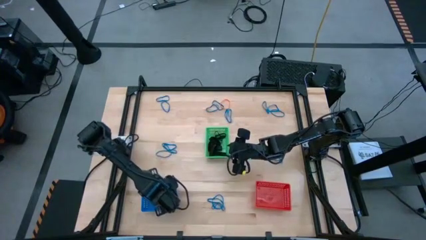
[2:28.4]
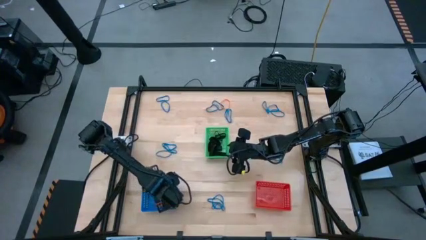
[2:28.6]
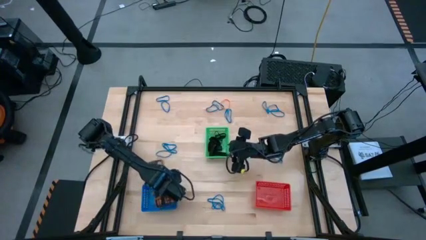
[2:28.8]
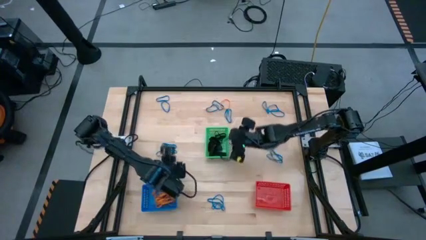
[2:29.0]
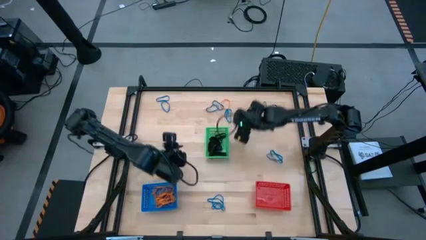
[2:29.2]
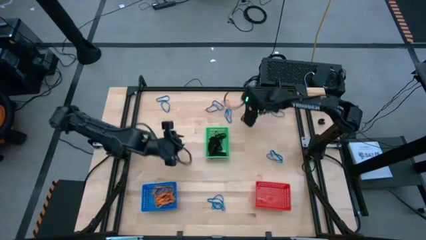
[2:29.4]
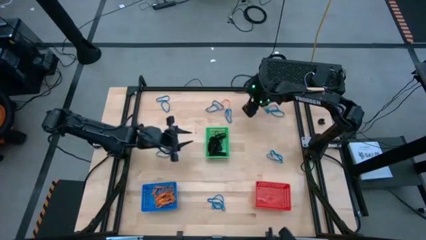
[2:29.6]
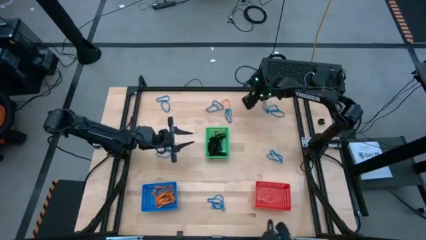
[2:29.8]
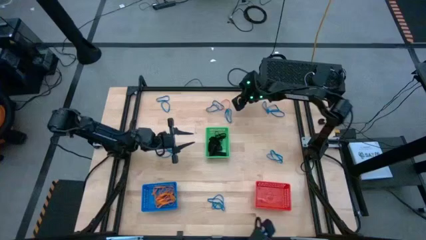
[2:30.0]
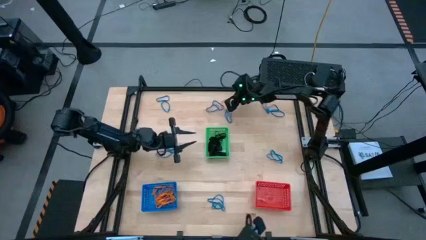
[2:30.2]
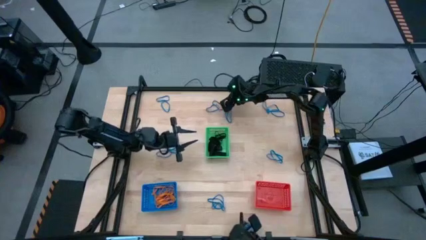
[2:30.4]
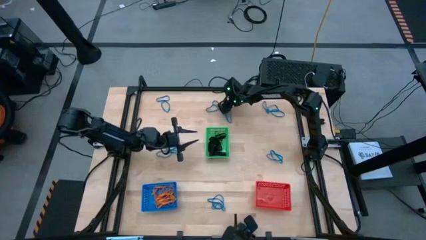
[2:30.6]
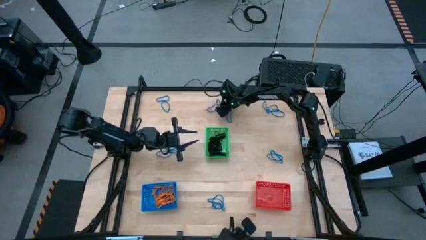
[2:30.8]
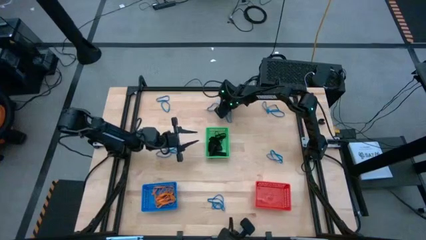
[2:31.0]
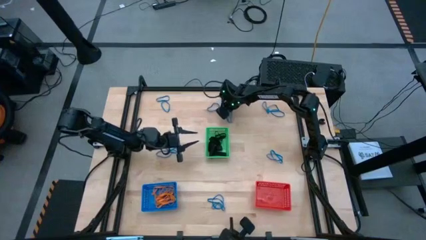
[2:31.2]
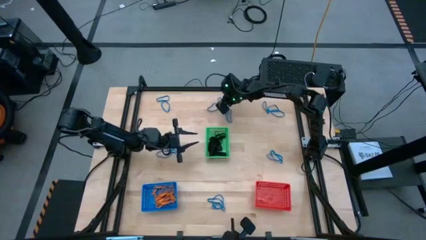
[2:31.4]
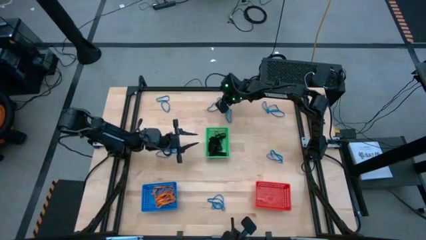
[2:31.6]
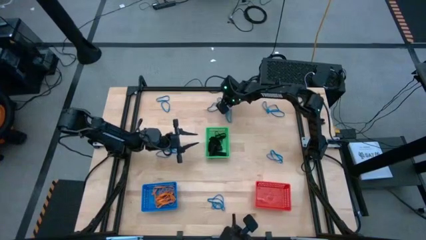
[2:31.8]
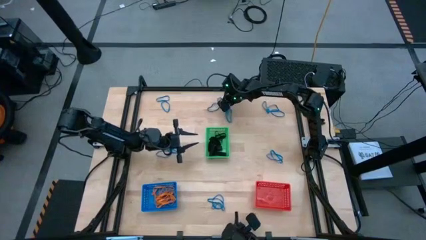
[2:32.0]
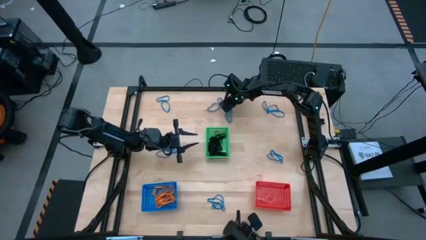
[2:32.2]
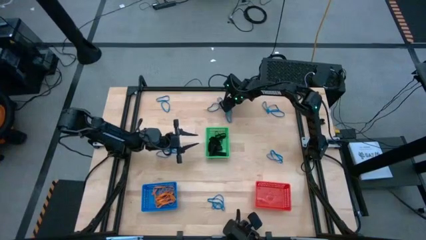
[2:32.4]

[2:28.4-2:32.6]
Task: Sort rubber bands into baskets
Put the orange rubber band into the blue bin

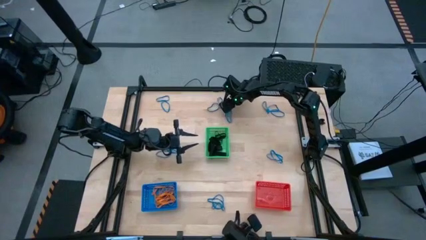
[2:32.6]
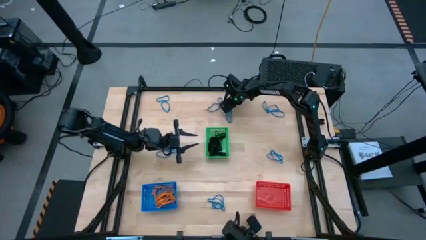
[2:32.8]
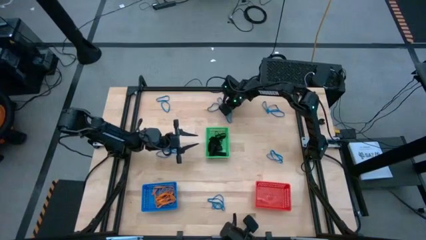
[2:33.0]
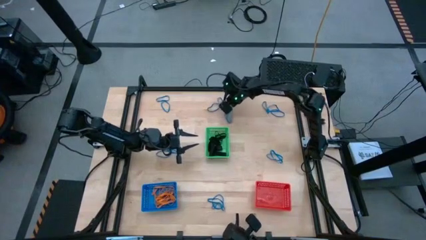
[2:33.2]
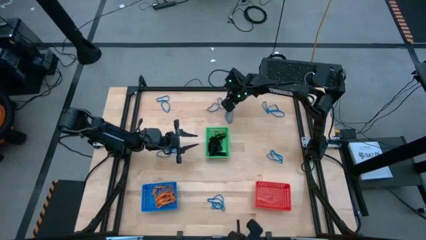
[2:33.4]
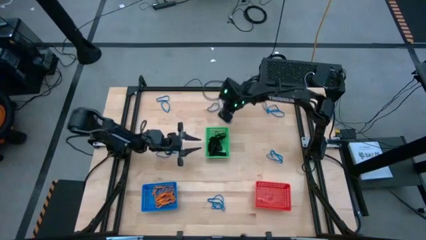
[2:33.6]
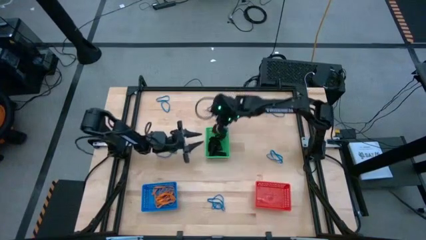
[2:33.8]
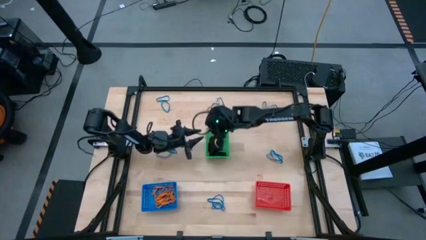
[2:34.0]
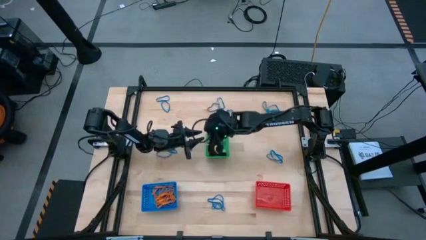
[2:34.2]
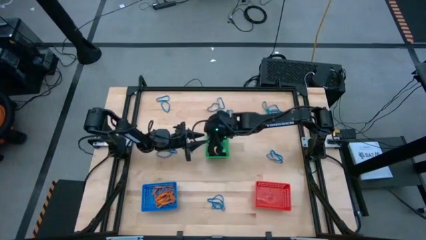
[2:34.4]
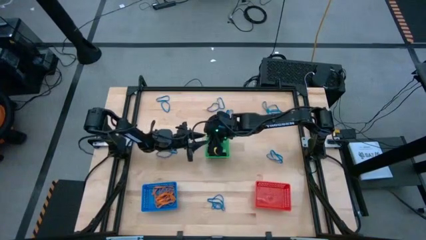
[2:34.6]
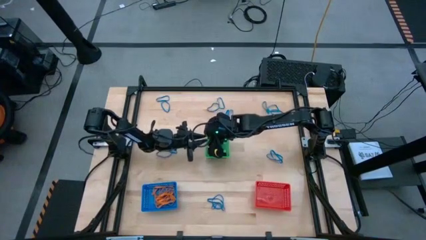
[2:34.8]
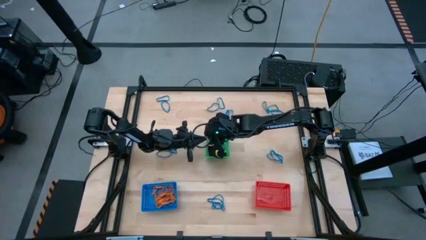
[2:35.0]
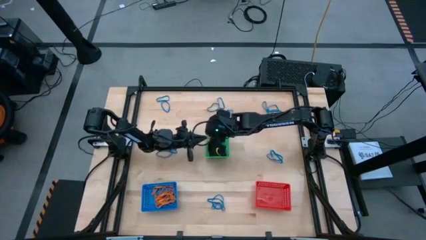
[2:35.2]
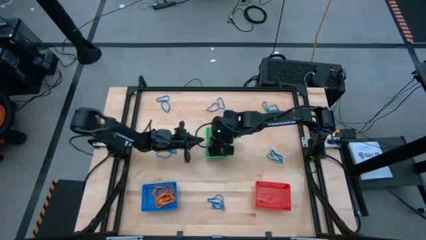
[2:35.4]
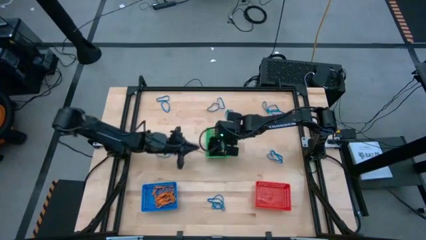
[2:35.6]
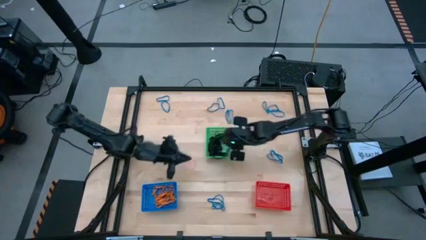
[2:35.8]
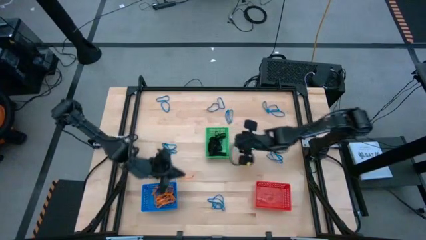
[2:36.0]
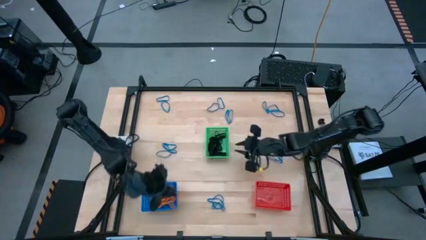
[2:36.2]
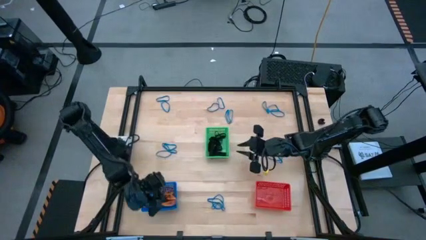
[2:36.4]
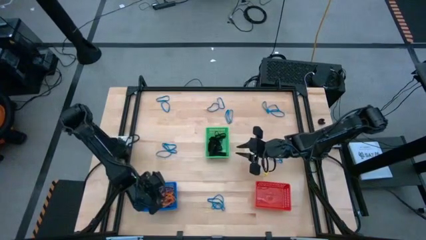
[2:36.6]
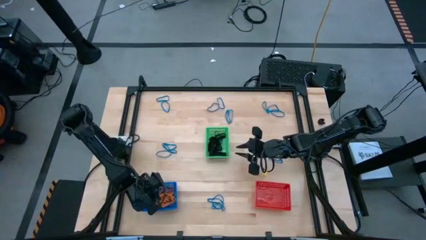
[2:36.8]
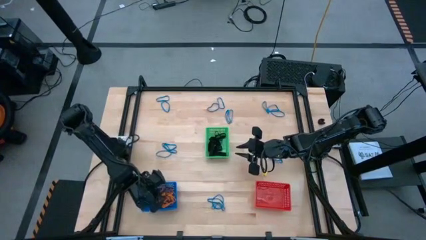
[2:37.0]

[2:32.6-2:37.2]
Put the orange rubber band into the blue bin

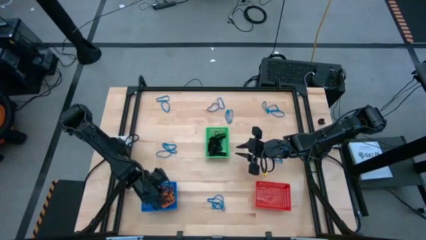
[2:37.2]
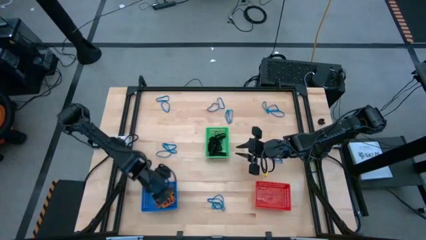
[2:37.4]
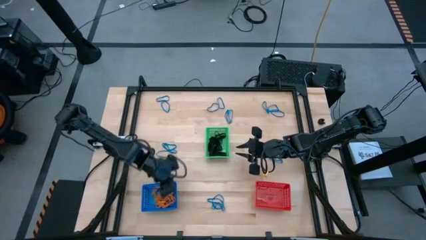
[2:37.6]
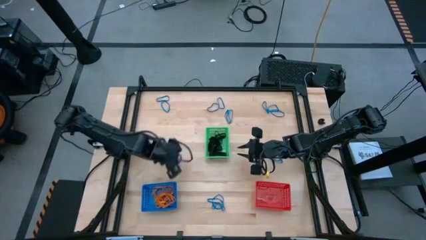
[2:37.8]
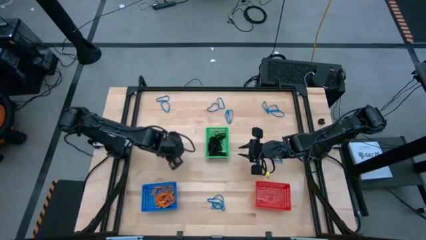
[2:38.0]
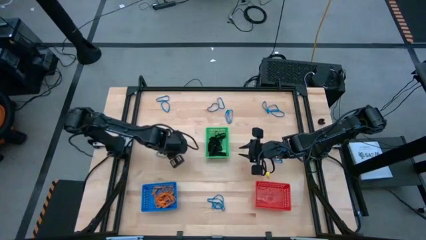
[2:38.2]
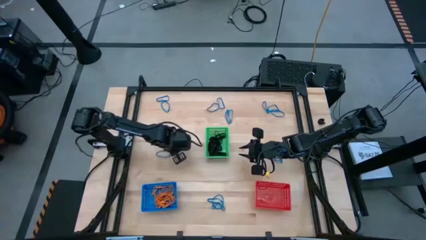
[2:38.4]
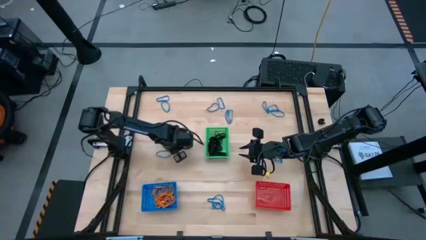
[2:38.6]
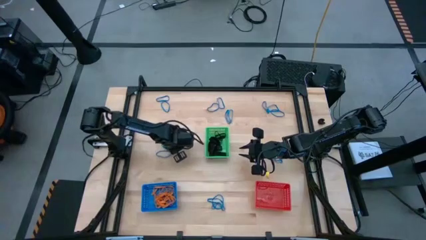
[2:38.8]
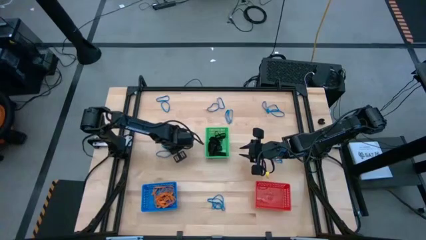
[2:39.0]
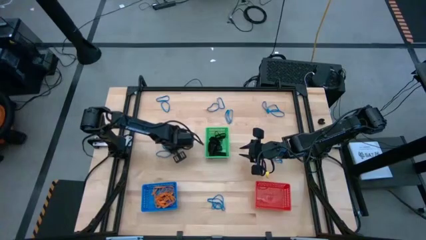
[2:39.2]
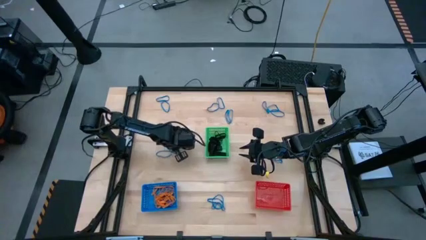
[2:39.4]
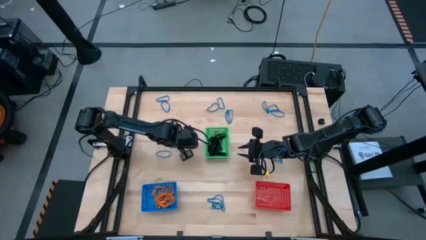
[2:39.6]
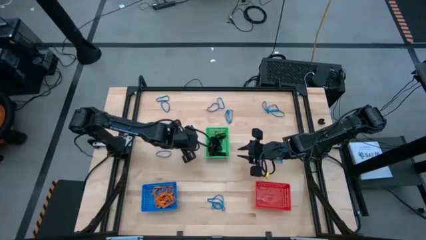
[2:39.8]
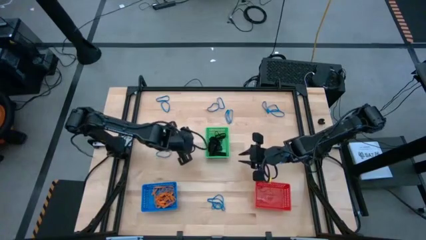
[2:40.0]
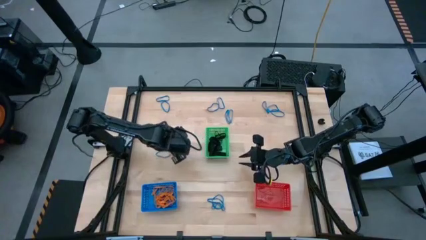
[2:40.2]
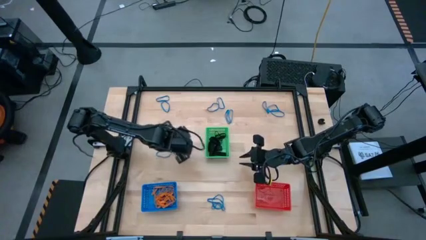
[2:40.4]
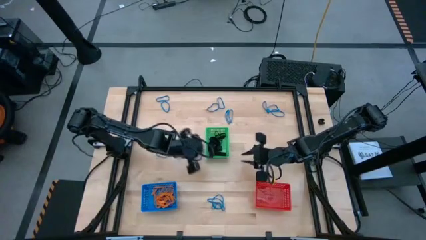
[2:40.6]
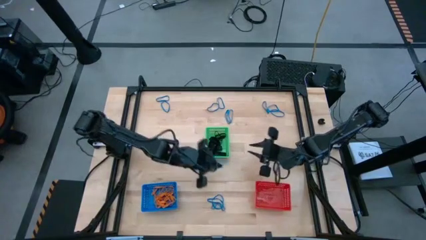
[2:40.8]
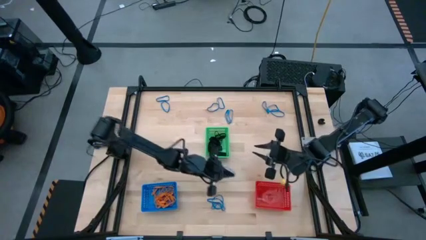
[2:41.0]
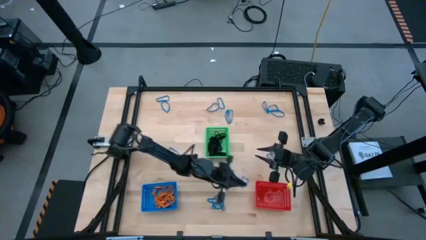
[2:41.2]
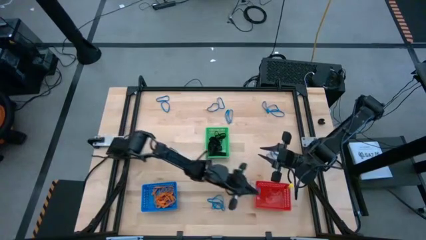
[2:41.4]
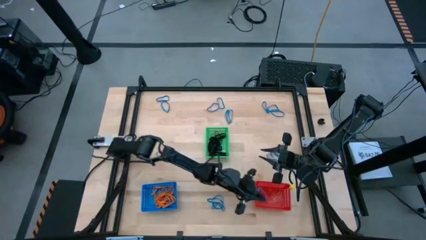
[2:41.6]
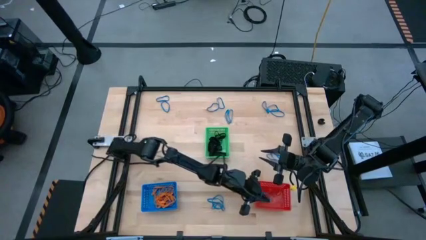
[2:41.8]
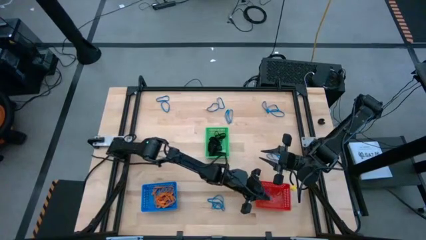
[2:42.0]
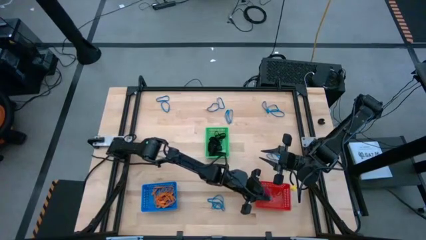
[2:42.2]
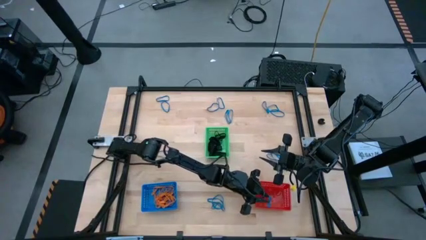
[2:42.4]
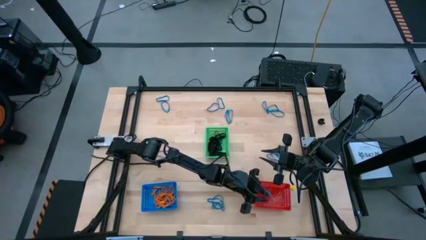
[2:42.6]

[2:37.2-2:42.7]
Put the blue rubber band into the red bin

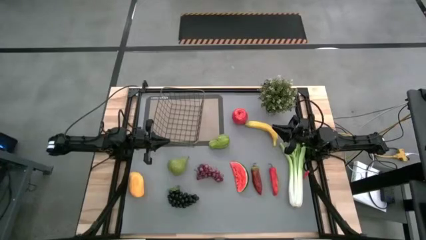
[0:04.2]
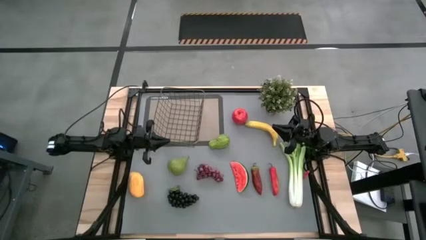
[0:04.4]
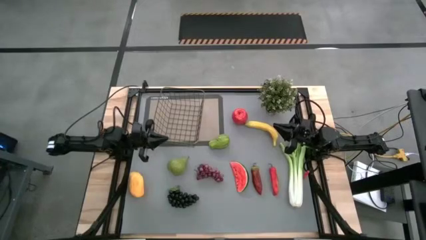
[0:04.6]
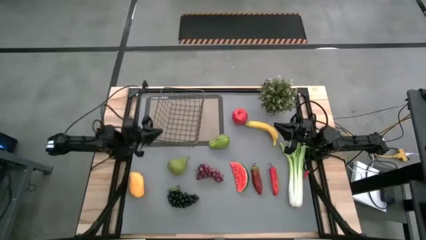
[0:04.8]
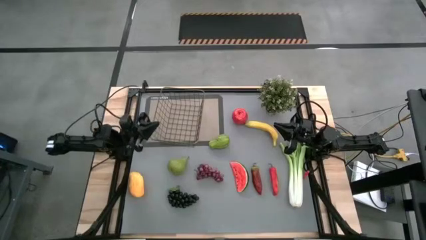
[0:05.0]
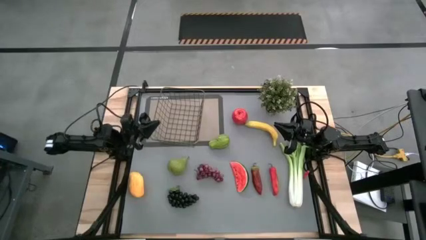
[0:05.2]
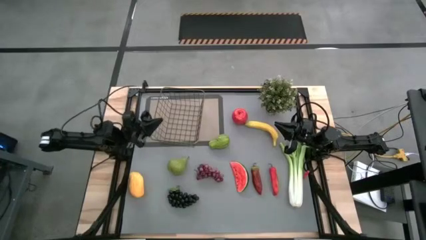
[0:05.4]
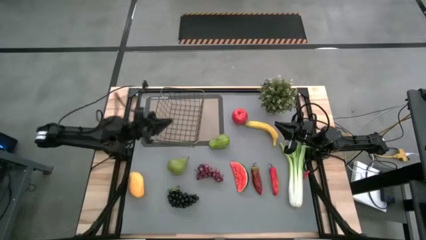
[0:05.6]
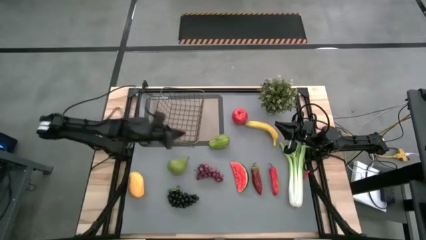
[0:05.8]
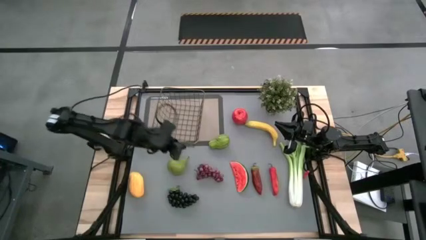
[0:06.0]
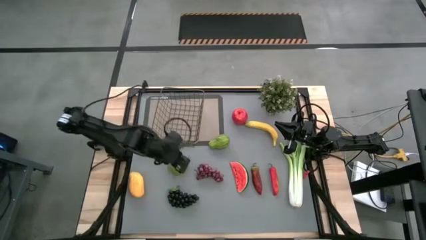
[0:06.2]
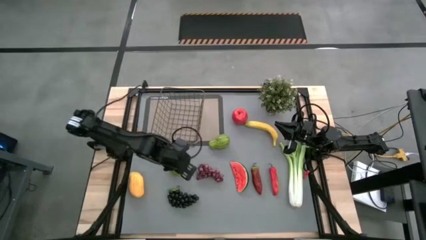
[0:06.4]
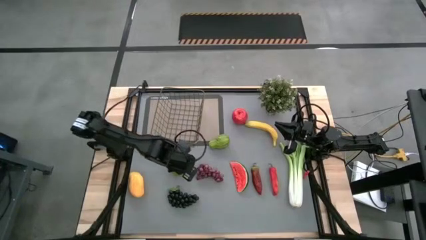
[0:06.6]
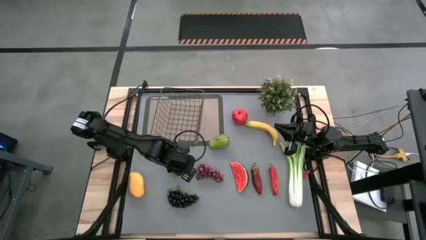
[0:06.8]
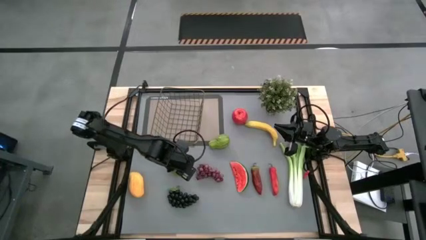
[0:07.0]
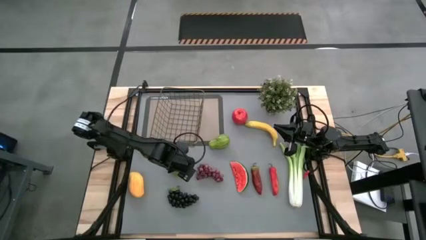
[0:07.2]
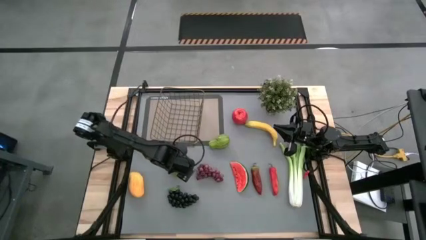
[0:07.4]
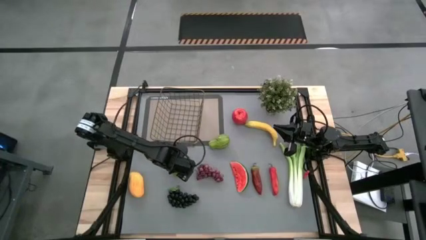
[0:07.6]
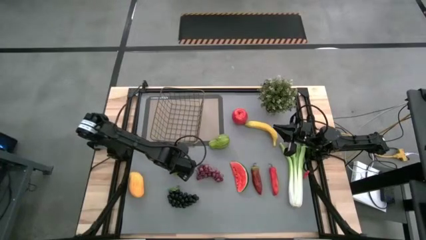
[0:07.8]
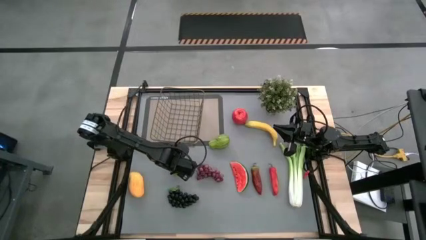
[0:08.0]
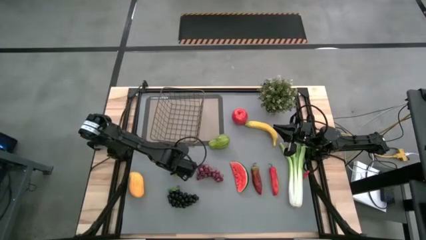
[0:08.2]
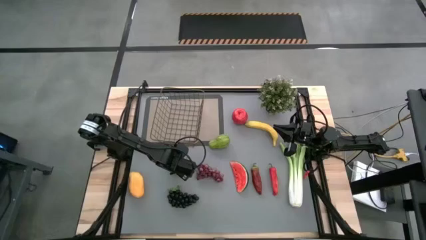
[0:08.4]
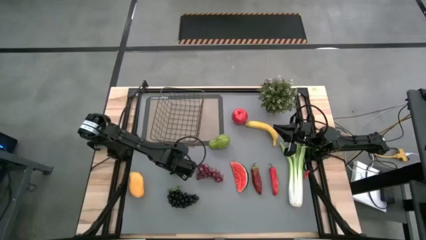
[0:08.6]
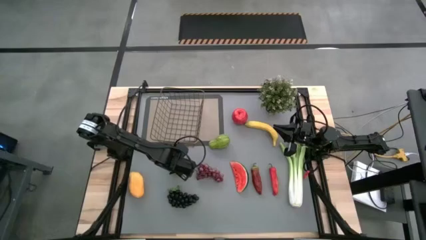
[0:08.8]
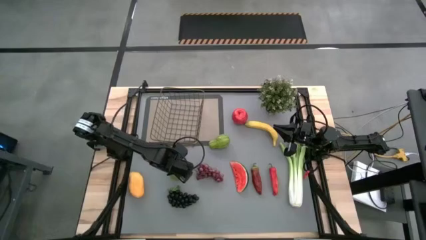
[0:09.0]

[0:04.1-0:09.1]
Task: Build produce basket
Put the pear into the wire basket
